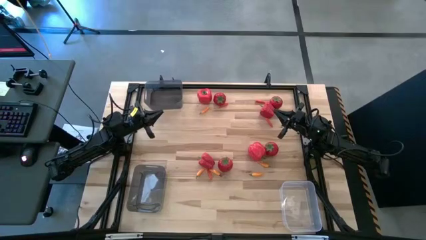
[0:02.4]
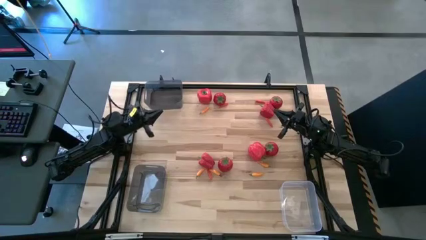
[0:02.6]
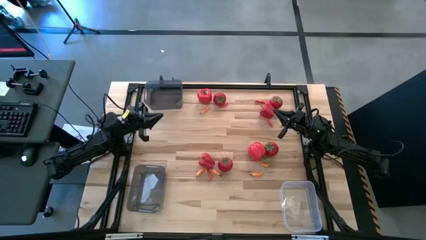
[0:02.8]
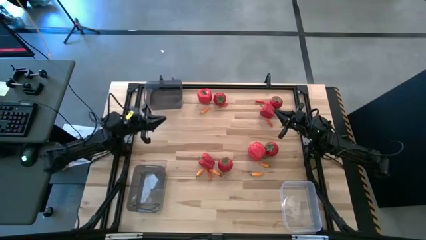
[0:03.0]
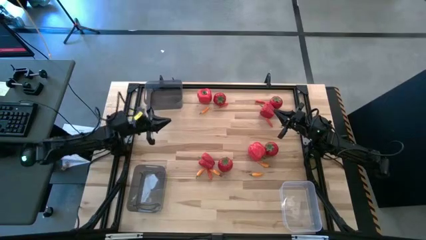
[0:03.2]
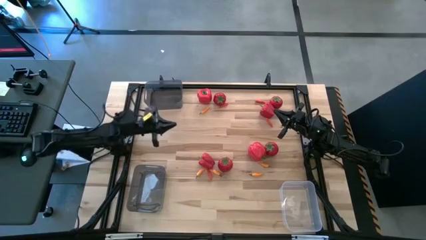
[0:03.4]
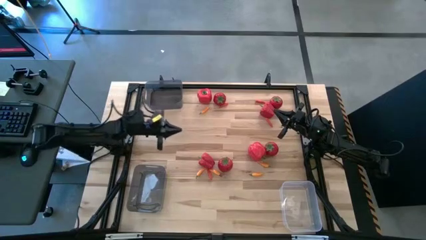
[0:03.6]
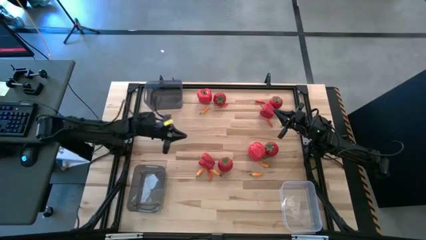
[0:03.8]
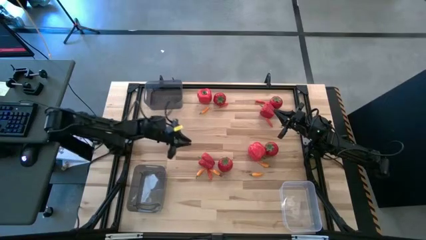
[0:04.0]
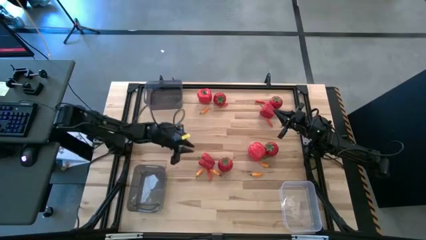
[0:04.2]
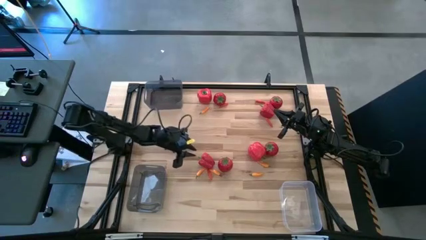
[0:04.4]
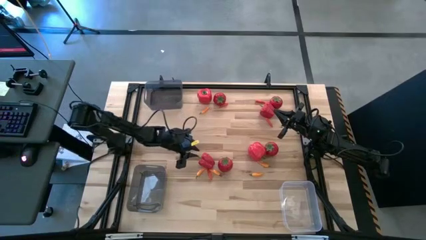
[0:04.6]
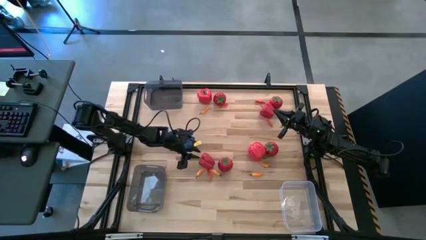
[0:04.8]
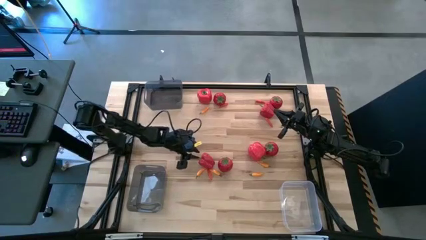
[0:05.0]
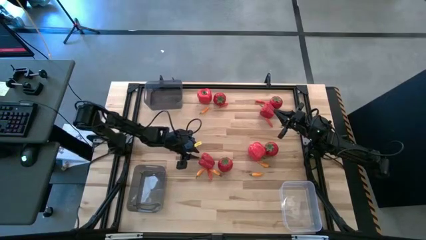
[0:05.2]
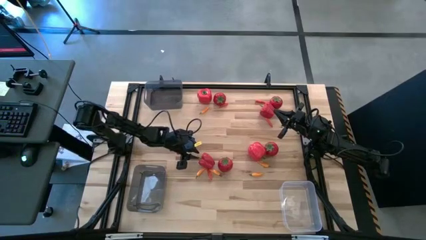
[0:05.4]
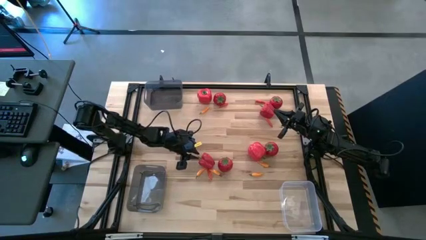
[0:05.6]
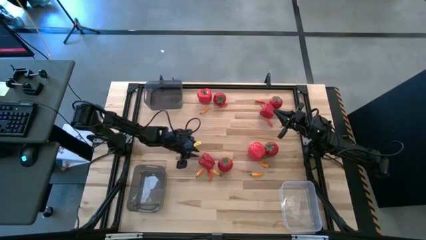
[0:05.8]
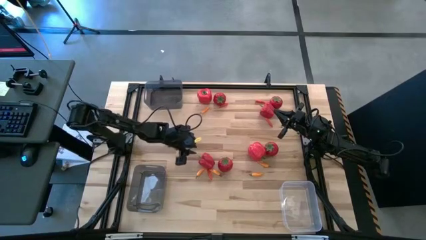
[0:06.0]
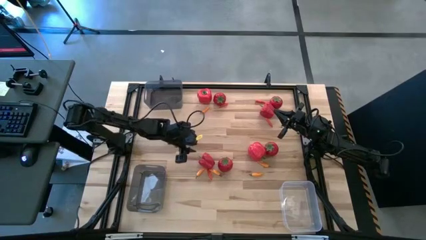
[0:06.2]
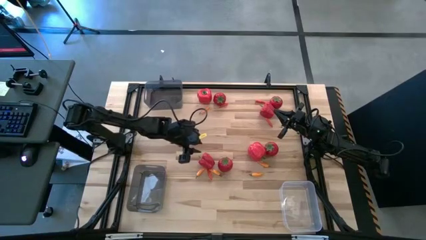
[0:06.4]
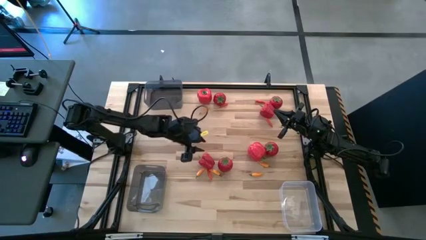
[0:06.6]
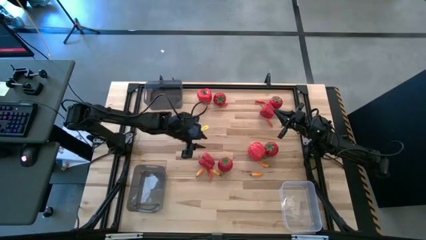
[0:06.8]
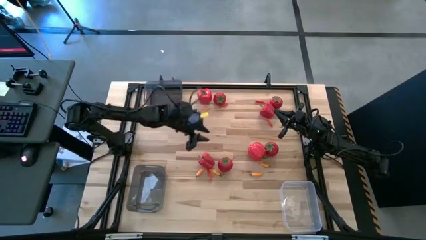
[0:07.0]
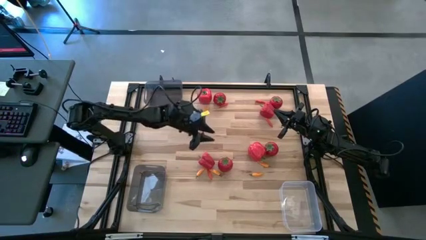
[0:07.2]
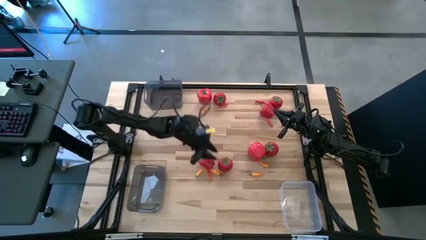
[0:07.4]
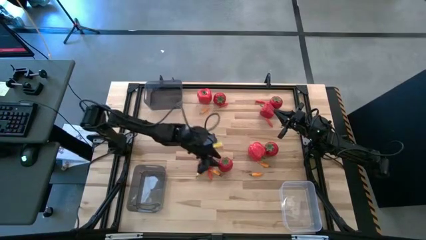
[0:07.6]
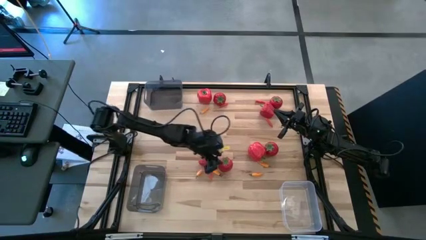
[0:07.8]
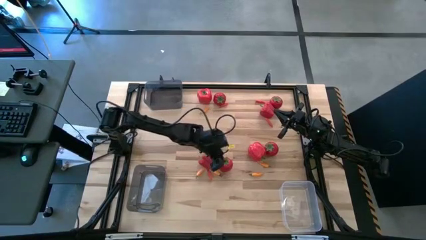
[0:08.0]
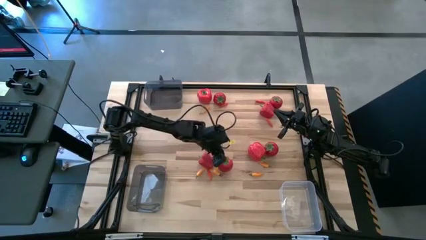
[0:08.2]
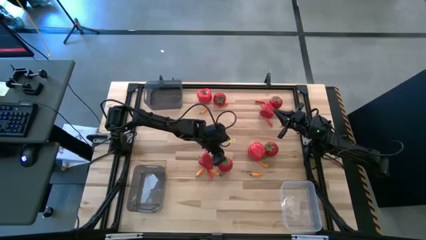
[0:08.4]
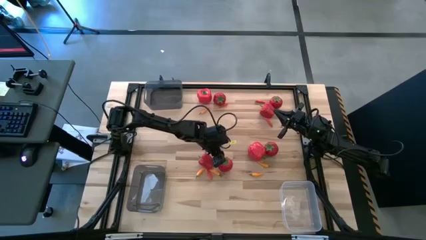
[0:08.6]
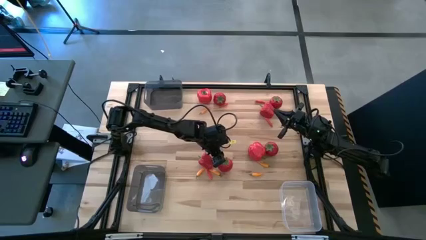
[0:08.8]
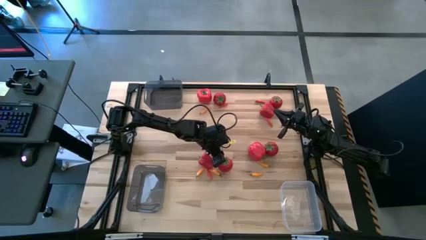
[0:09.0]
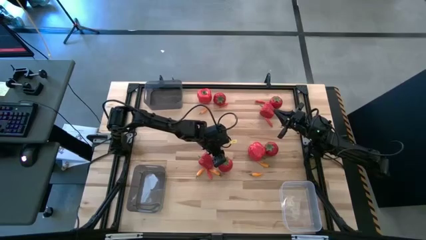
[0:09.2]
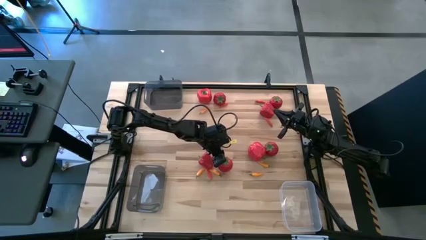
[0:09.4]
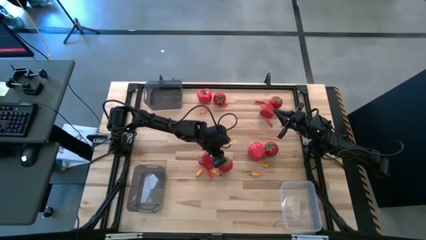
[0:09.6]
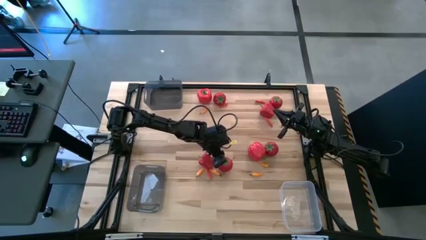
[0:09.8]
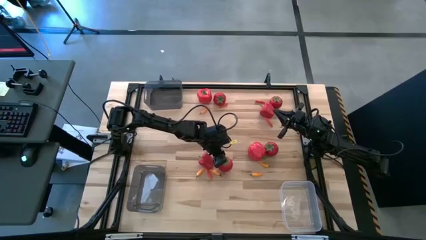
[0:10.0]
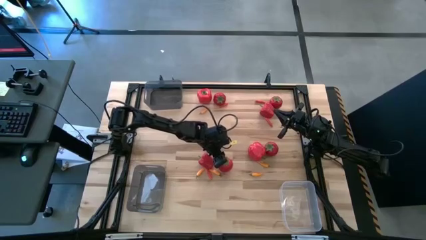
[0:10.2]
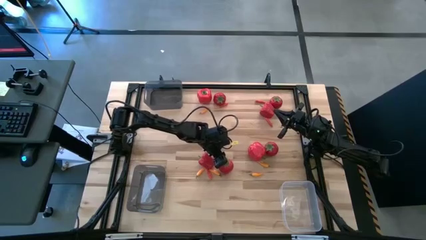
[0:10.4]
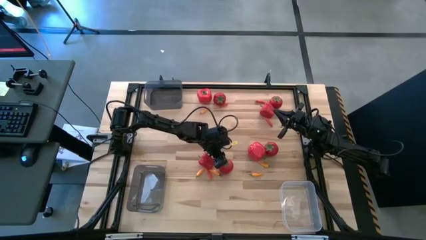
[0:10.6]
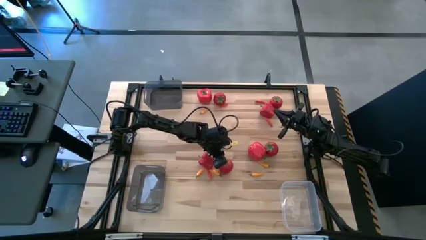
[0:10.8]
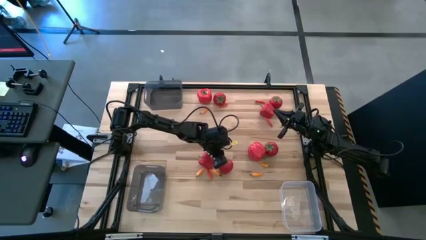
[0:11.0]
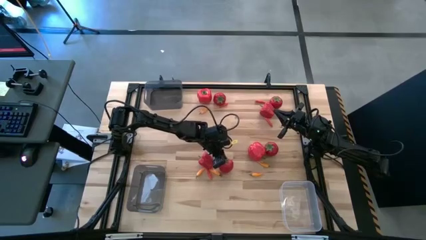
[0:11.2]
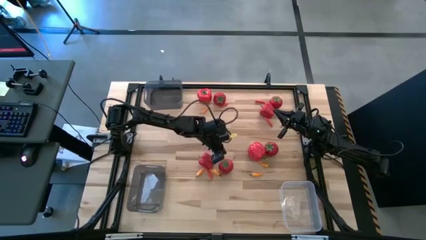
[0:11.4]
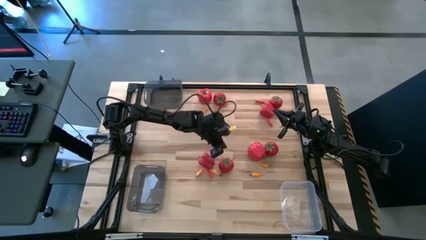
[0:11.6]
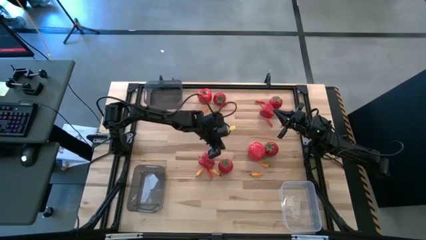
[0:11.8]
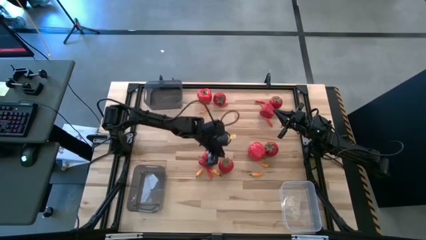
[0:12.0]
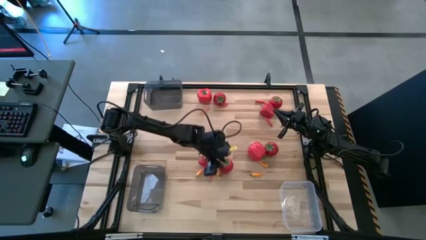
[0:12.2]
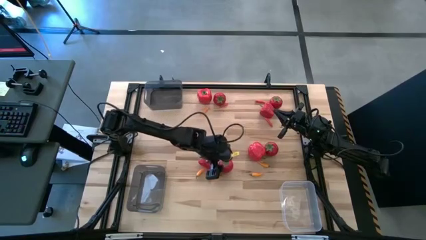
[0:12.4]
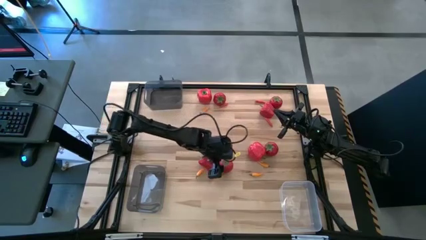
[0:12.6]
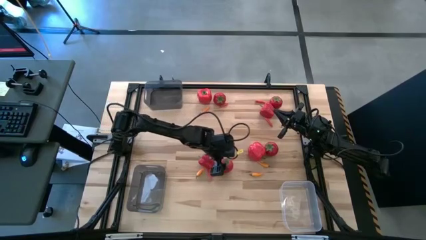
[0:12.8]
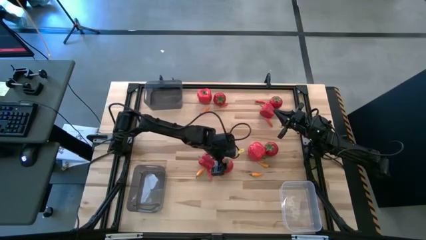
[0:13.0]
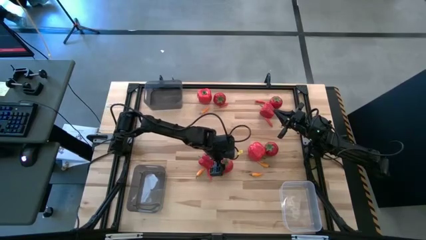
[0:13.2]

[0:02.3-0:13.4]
Task: Sort produce into baskets
Put the red tomato into the top black bin
